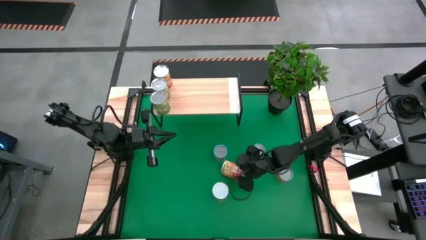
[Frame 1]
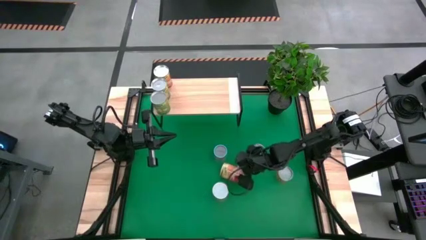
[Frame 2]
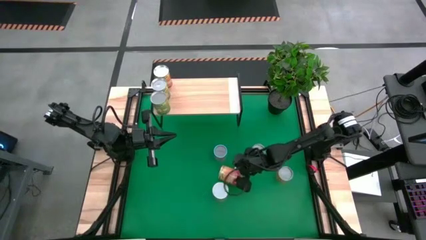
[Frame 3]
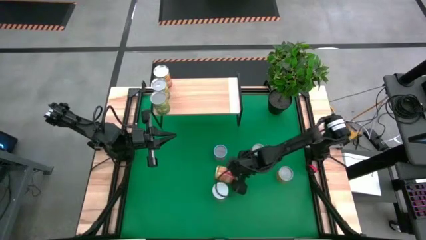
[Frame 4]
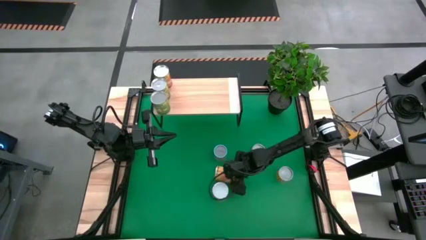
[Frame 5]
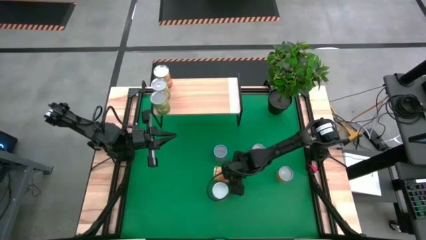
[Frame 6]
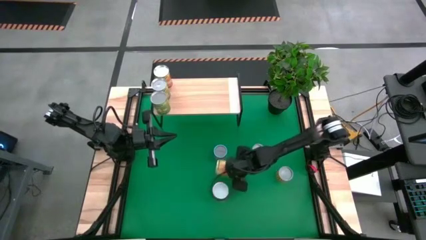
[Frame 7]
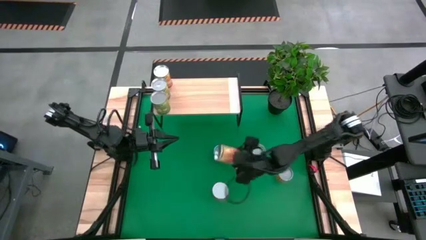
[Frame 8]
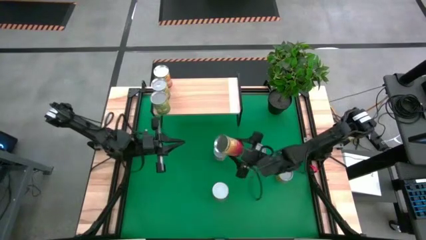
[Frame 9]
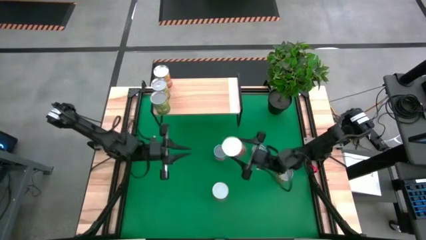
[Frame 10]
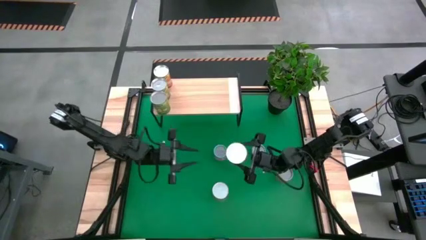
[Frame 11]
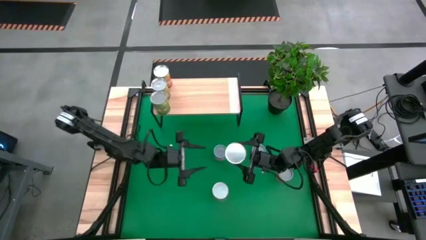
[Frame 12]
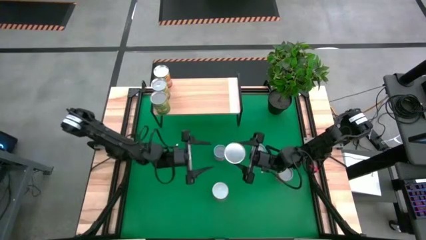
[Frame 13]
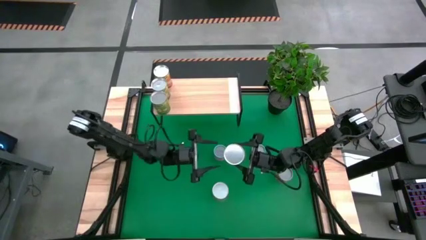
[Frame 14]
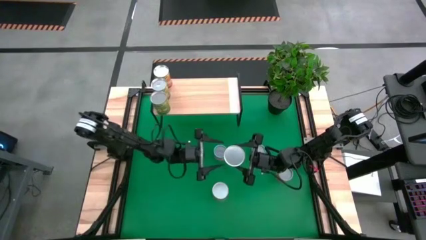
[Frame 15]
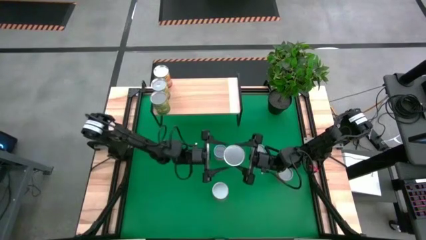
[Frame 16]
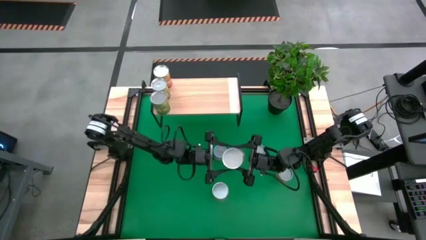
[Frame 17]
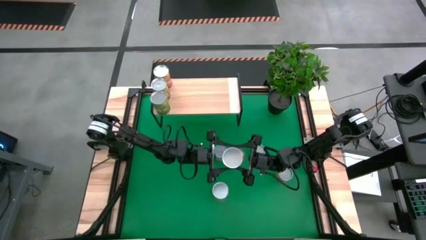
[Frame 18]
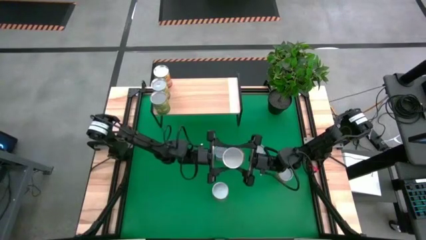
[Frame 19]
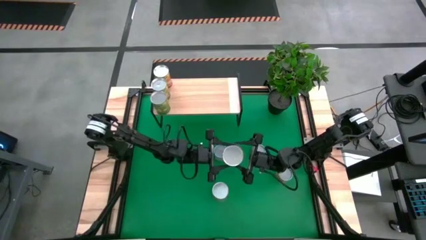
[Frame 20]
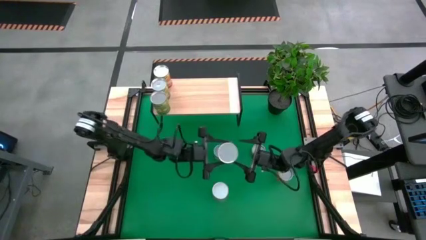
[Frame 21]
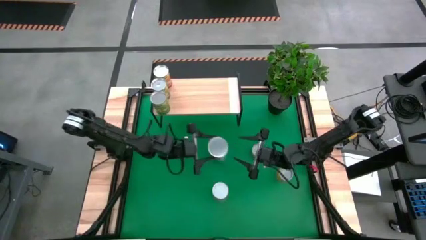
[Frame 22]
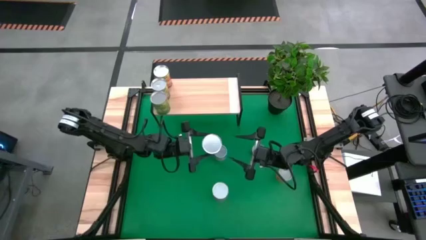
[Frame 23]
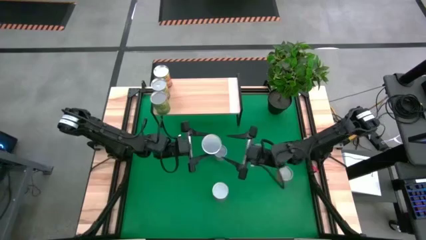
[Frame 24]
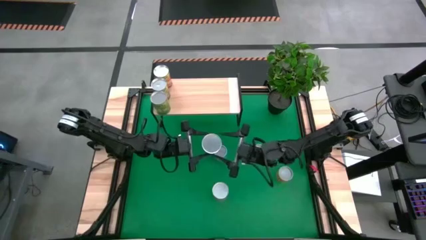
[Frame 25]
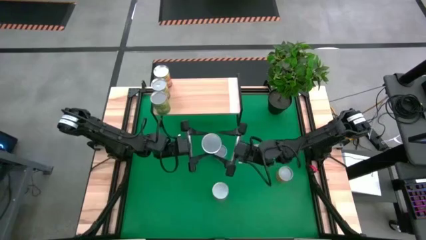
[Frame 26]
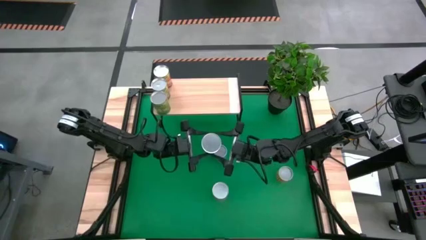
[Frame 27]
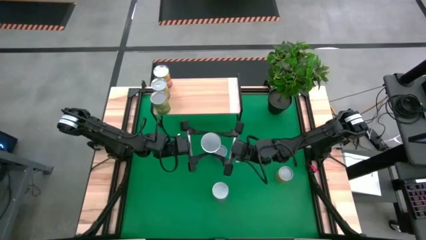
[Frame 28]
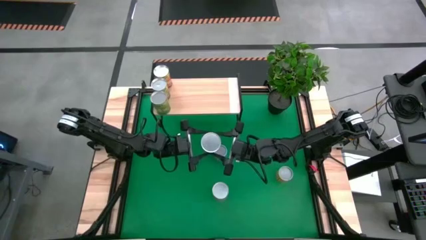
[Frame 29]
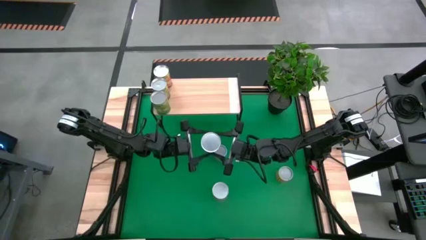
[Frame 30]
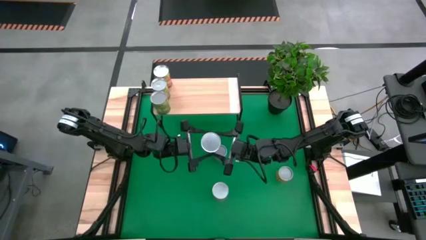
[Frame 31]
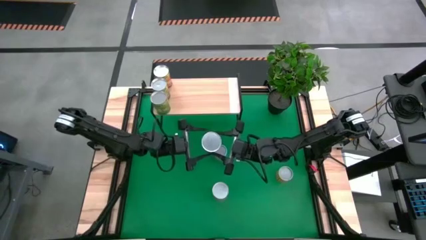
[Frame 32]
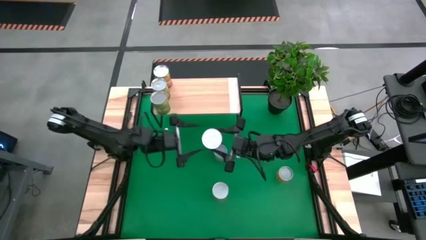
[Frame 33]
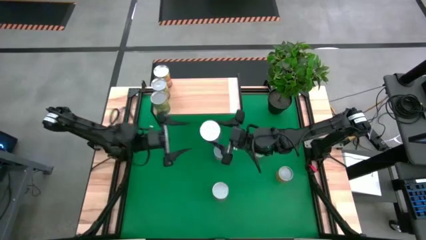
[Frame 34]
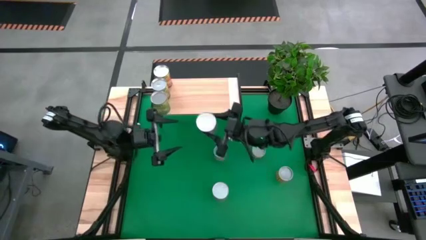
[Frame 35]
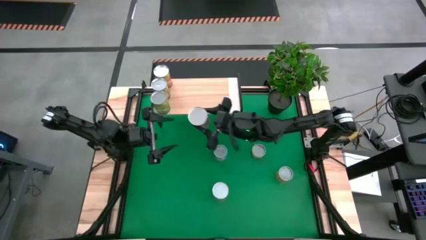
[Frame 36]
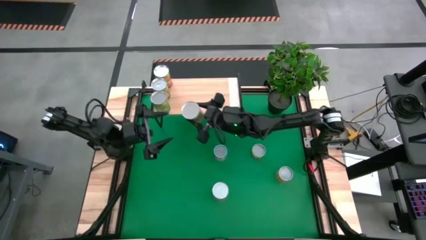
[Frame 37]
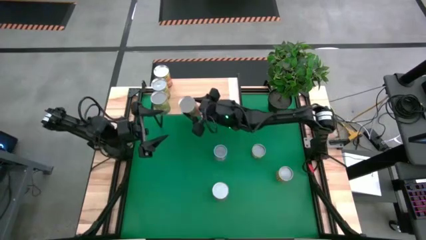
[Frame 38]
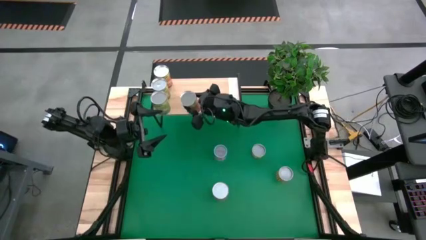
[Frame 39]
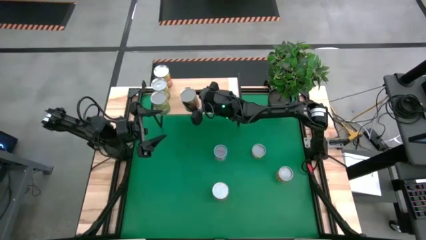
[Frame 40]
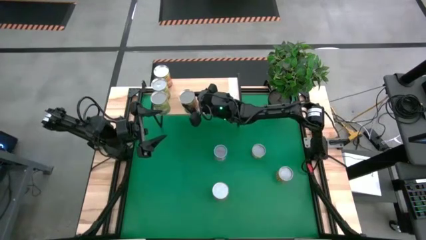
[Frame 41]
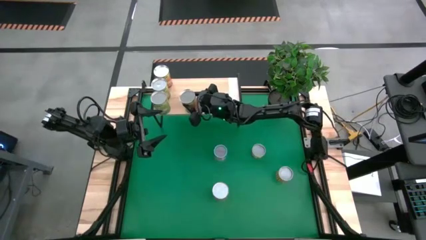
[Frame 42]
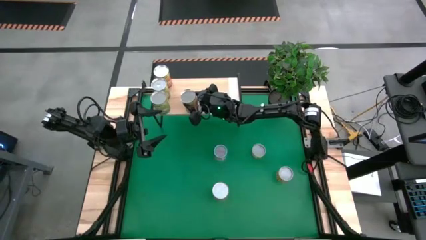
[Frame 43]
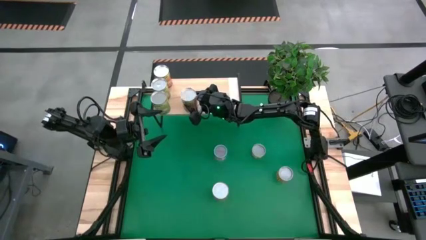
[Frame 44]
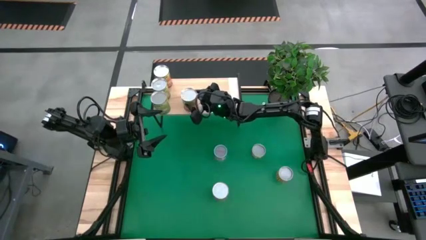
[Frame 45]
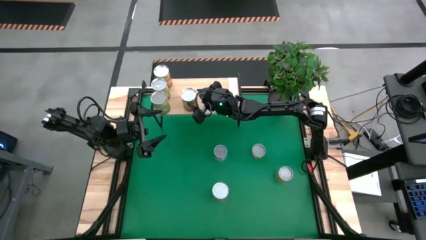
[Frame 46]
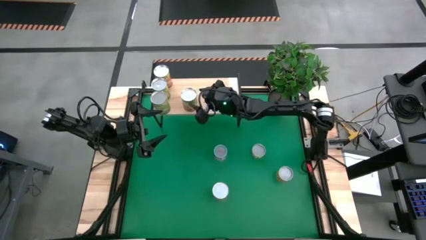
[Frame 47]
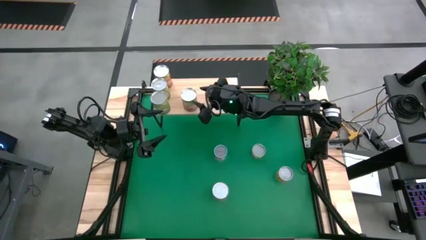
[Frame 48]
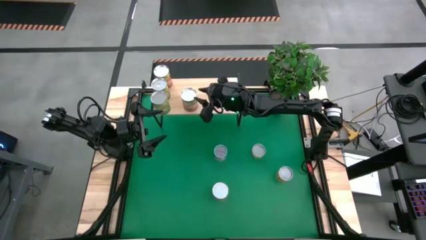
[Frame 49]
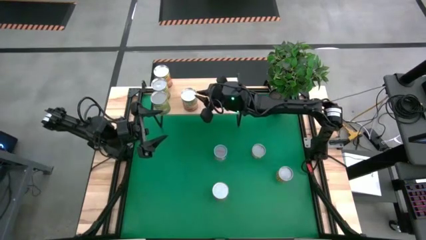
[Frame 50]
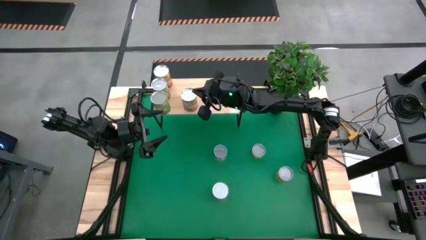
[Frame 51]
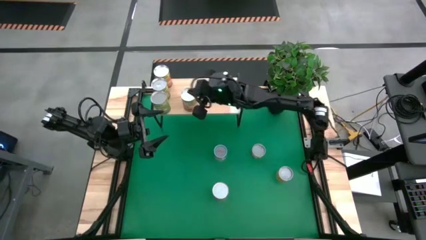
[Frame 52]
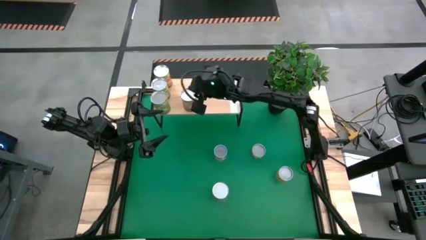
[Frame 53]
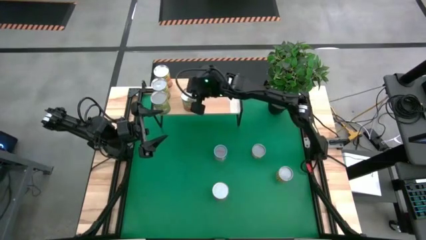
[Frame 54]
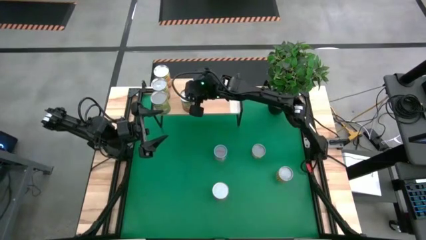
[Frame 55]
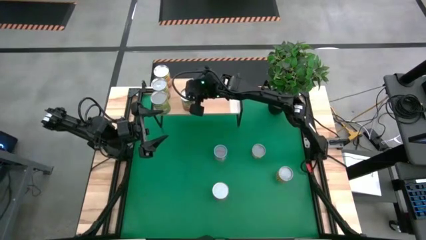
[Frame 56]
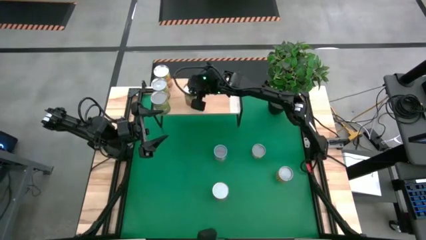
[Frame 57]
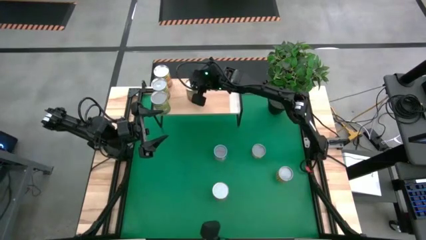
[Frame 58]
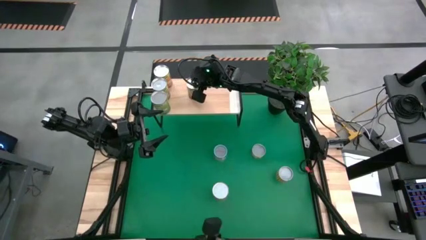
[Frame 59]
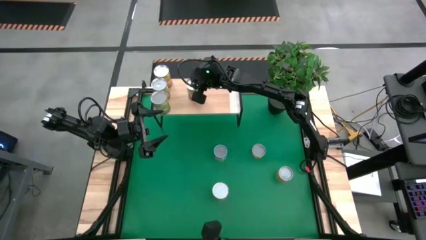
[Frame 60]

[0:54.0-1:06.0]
Task: Pick and place cans onto a shelf
Put the corn can on the shelf

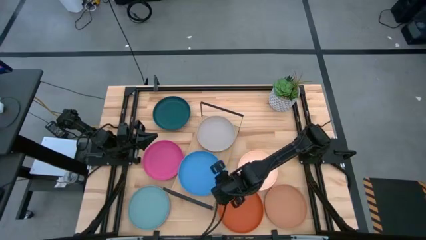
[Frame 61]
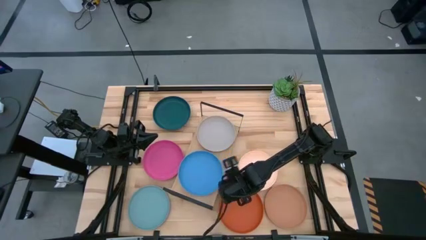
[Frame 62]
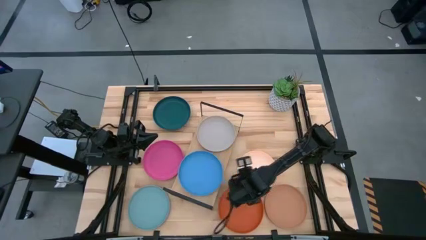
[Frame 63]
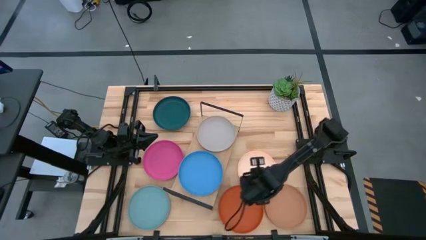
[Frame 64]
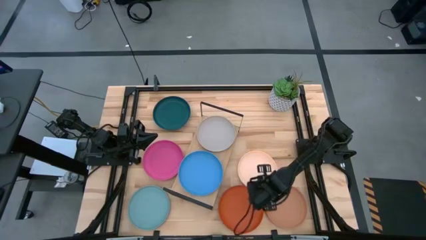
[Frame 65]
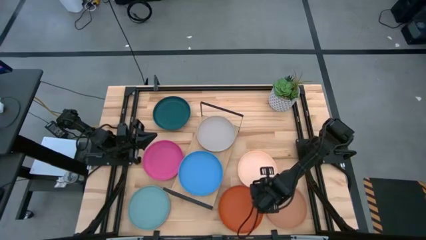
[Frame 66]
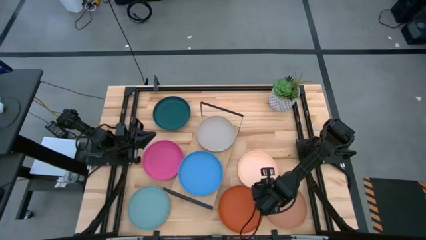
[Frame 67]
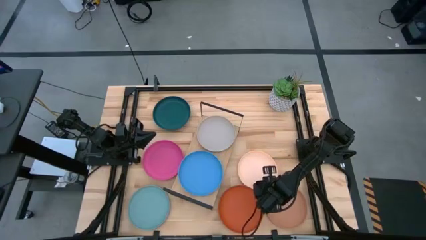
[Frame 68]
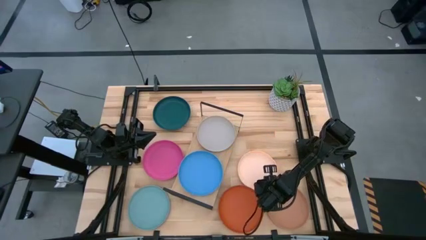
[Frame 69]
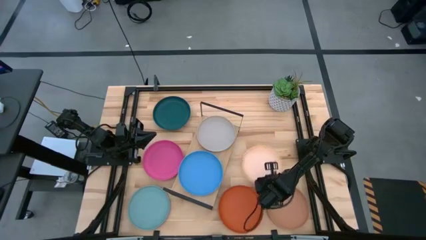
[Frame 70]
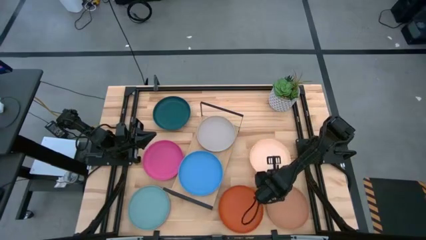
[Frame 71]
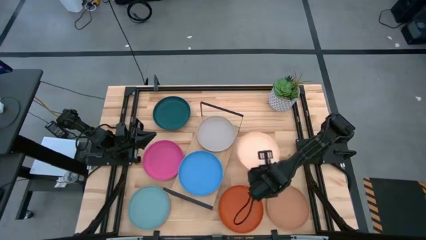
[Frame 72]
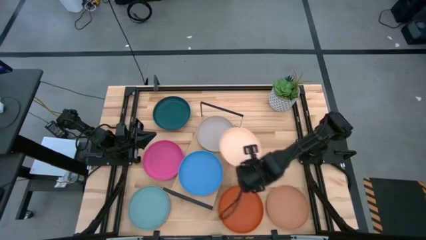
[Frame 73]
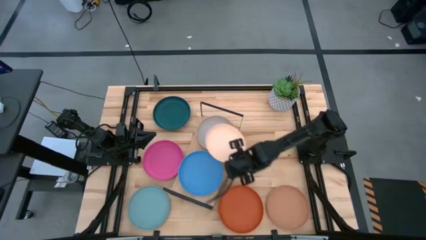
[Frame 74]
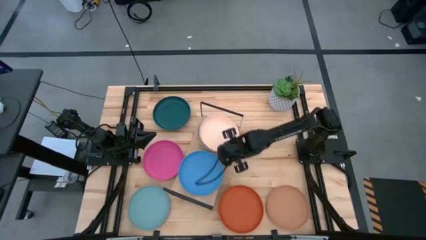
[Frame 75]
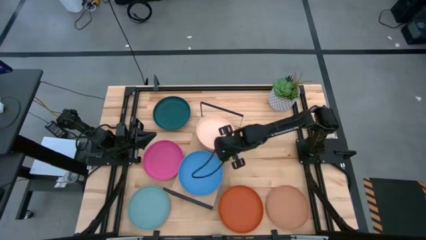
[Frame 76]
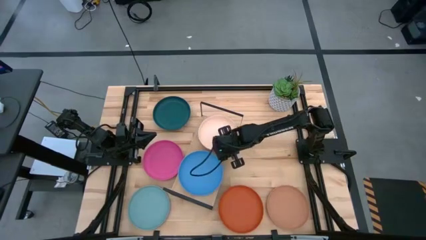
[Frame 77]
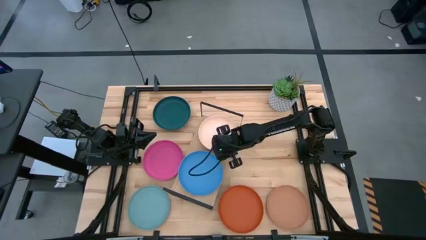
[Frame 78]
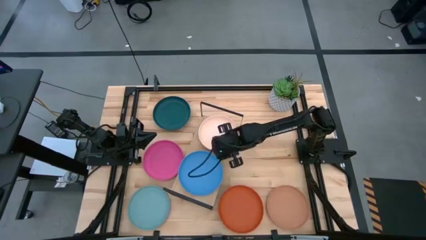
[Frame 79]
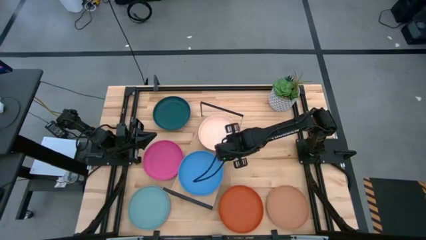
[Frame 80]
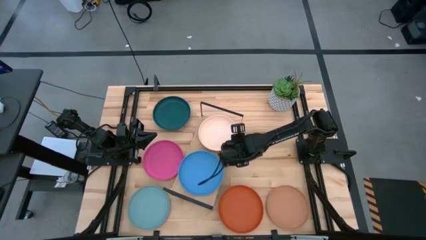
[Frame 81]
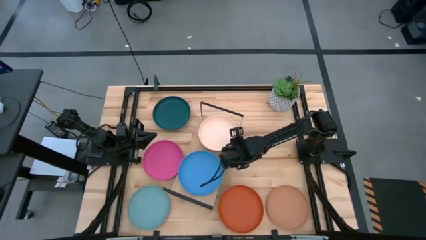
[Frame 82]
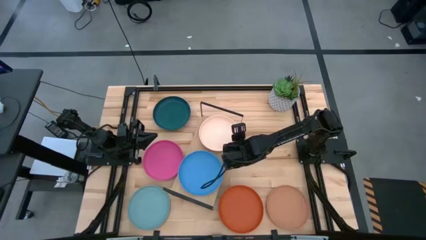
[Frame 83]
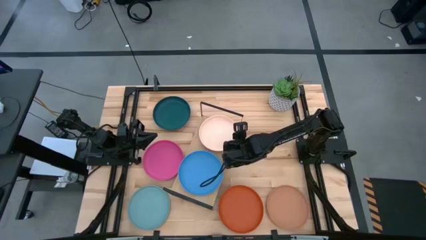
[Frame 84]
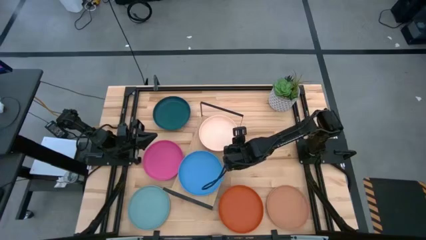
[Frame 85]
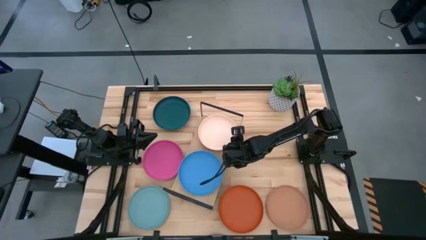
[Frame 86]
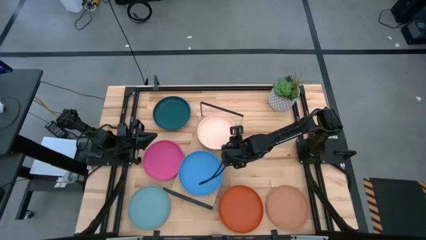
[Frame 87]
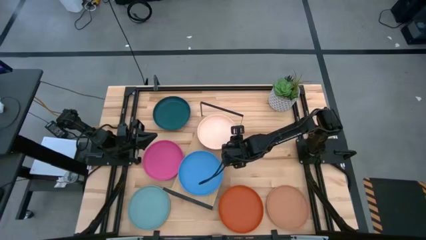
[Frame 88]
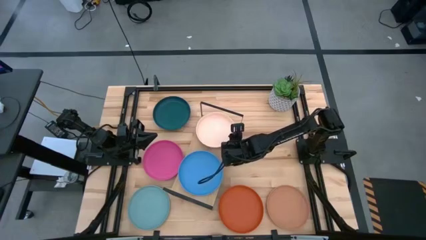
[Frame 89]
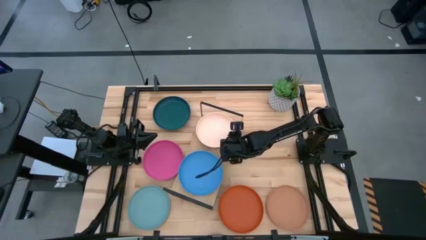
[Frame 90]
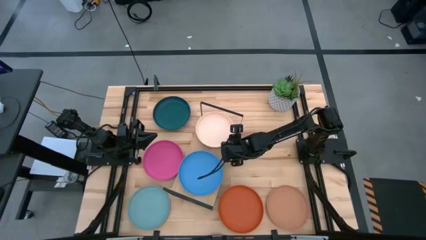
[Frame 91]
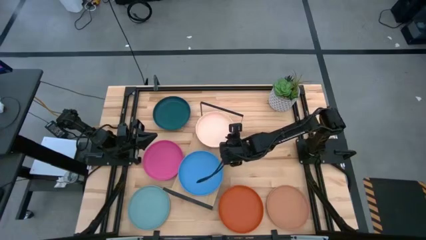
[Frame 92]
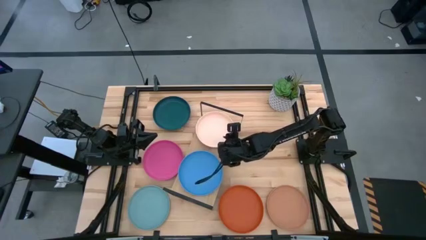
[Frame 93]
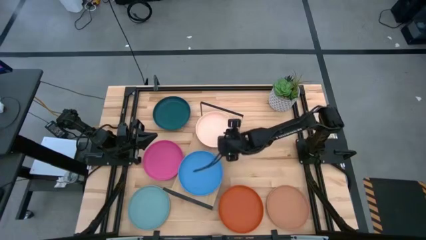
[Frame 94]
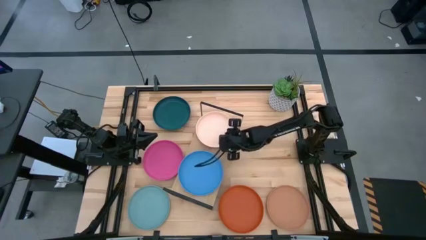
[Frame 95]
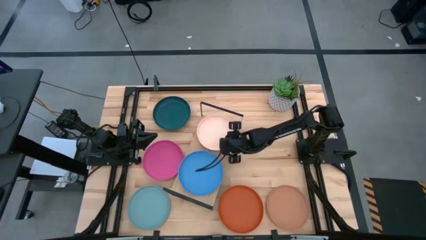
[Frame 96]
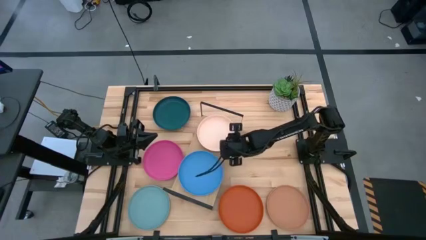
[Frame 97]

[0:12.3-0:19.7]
Task: Place and stack plates onto a shelf
Stack the white plate on top of the gray plate on the shelf
